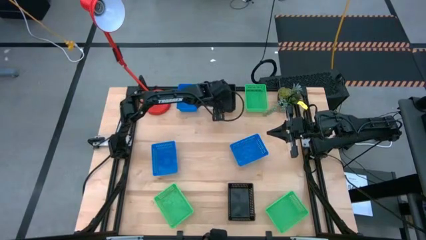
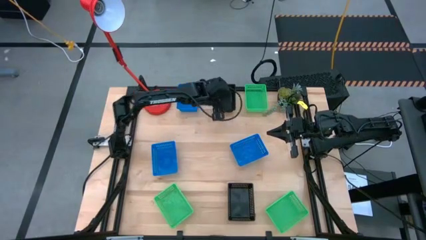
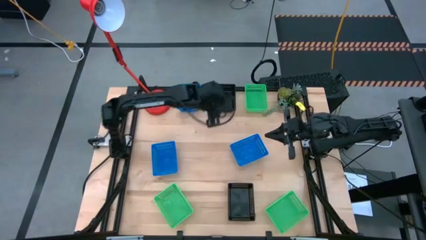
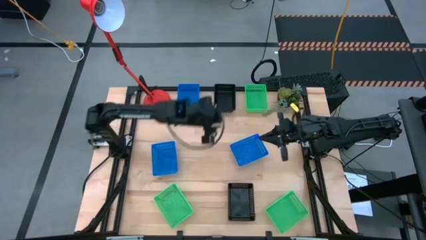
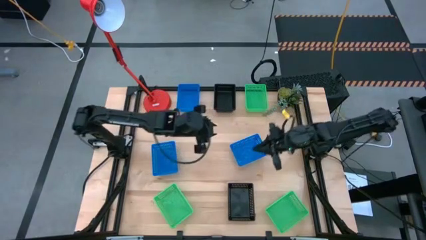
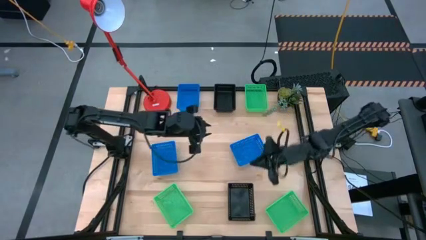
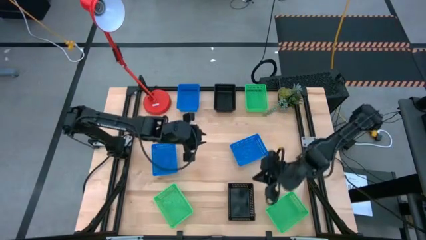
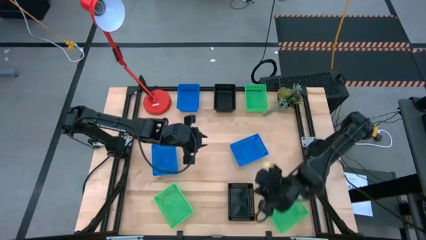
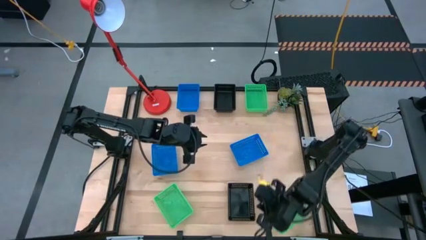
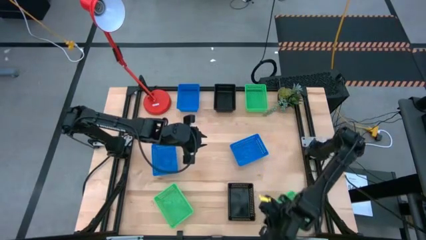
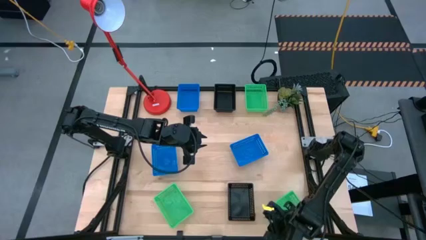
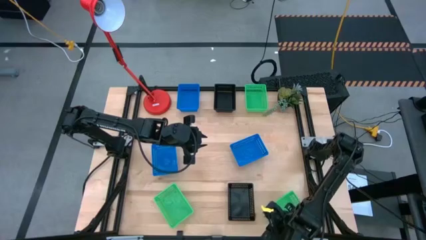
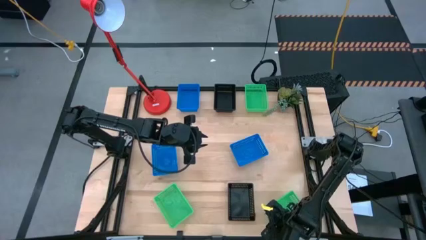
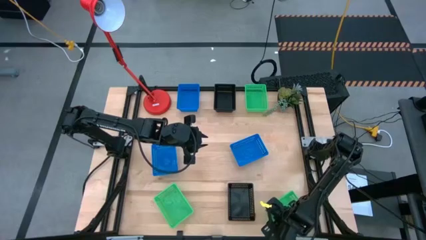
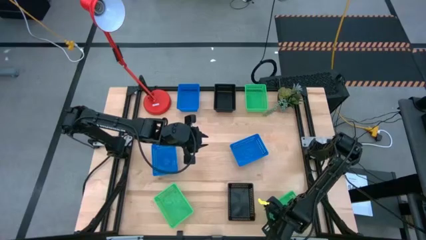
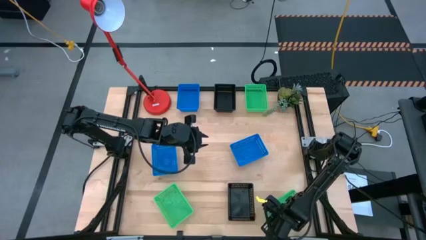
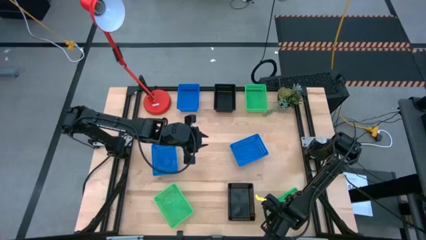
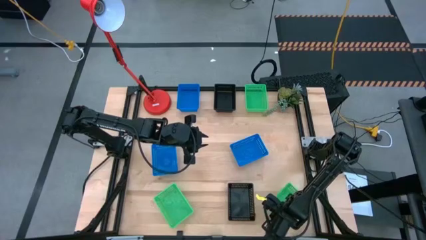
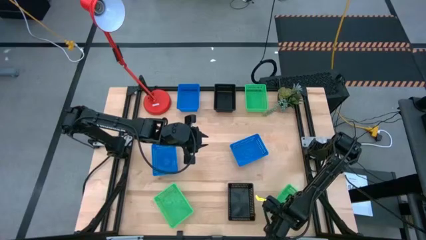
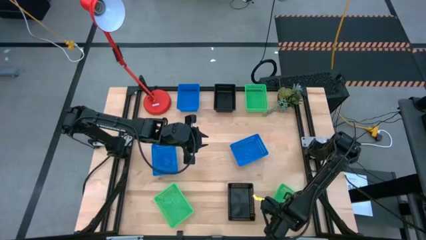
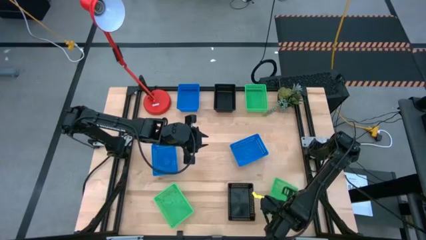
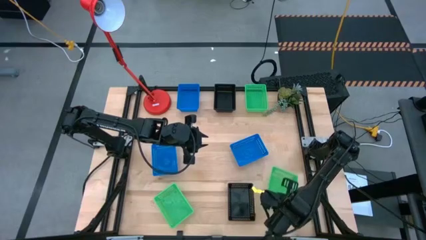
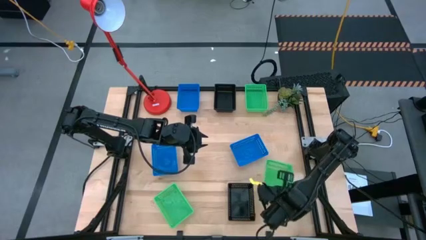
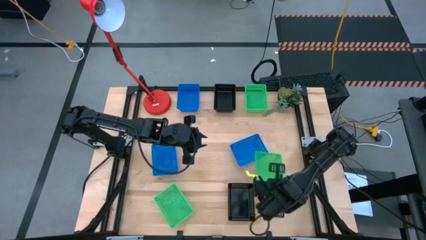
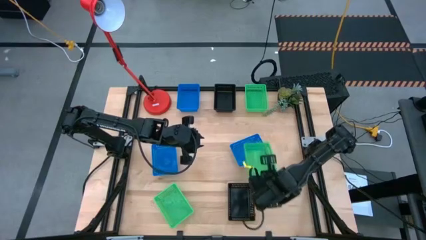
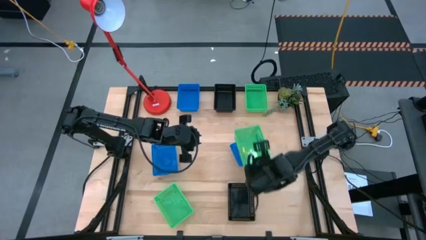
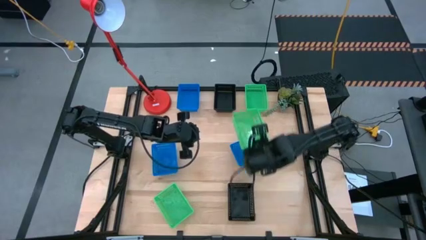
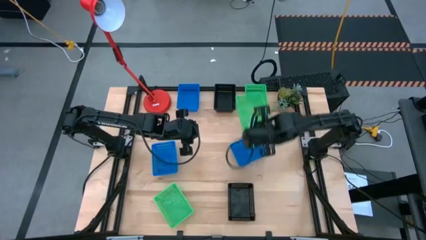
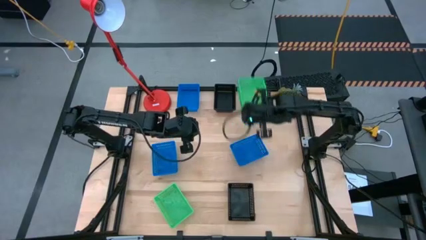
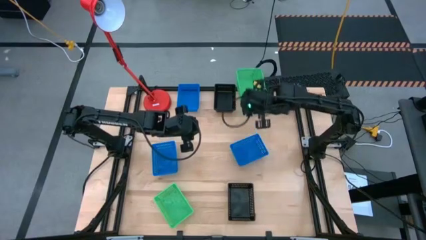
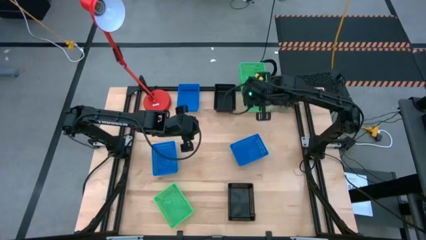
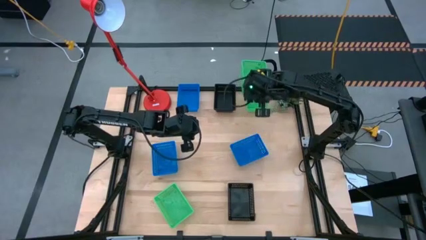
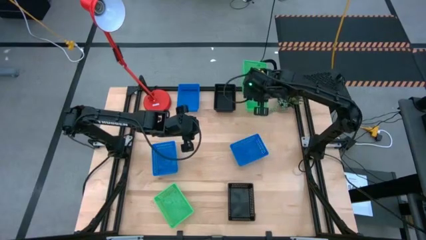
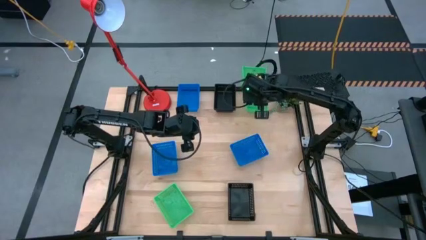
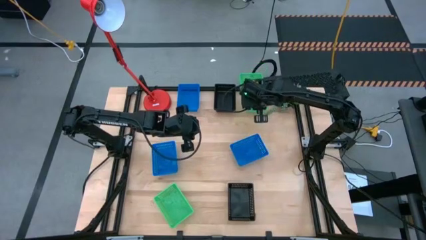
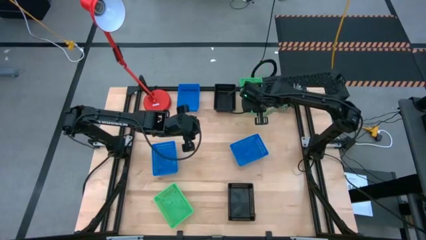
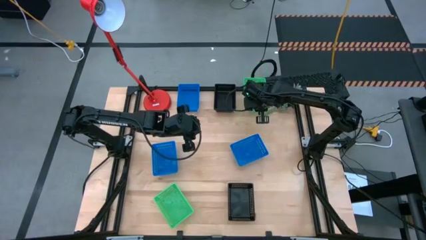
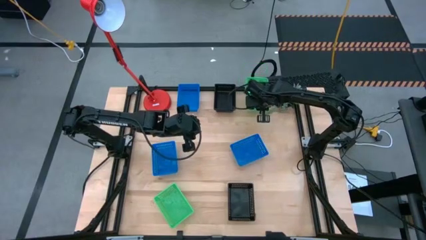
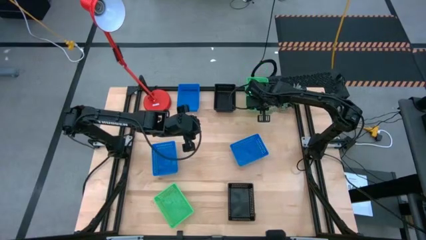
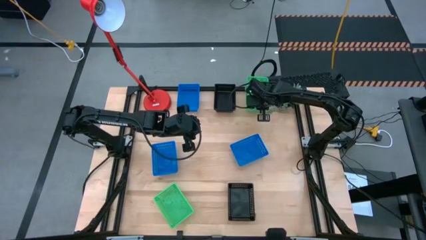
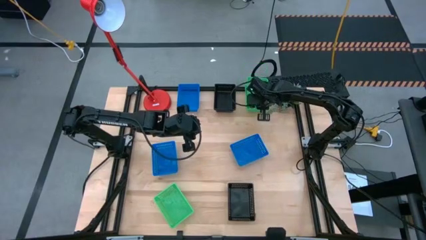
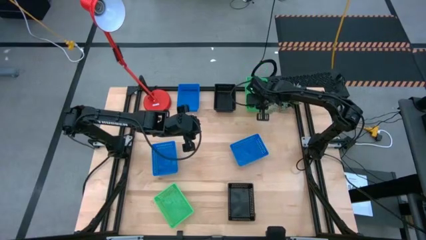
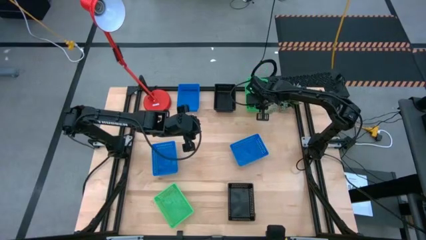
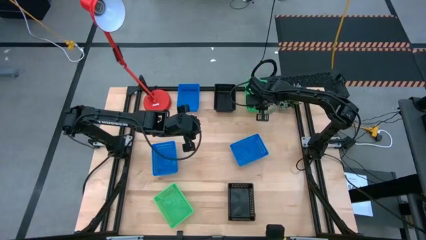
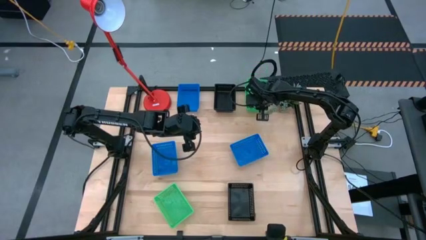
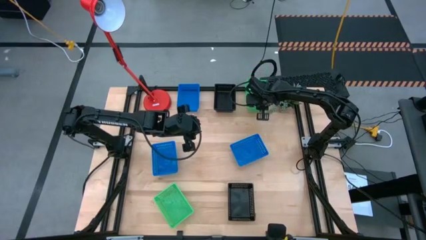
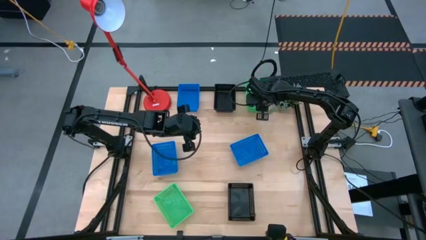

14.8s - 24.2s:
Stack the bottom right green basket on top of the top green basket

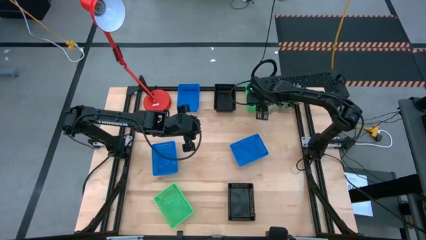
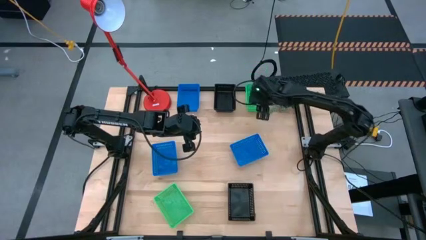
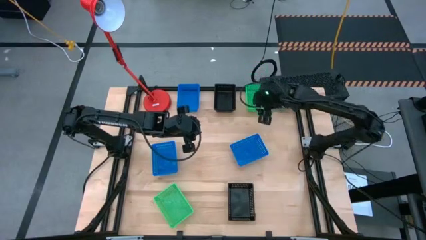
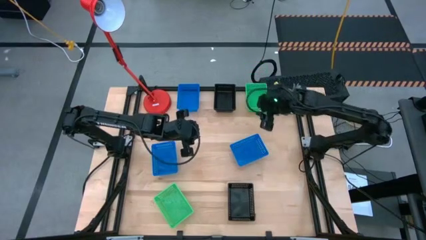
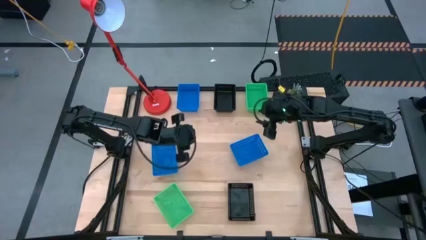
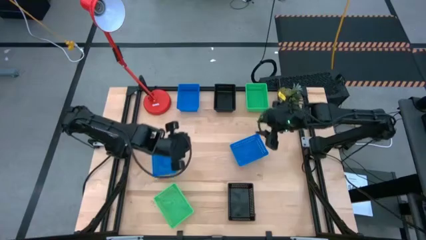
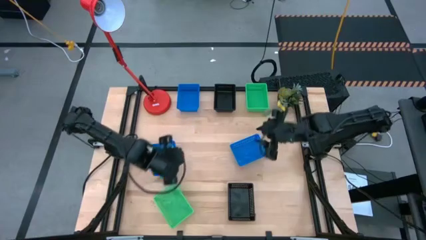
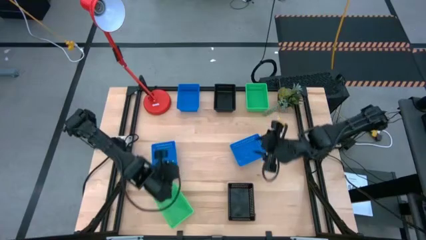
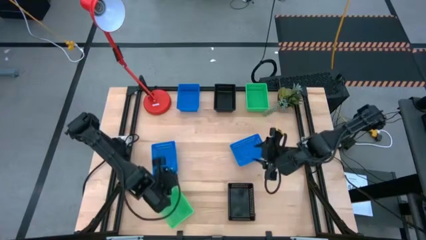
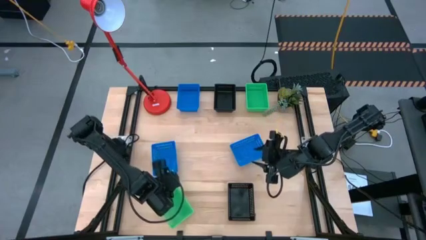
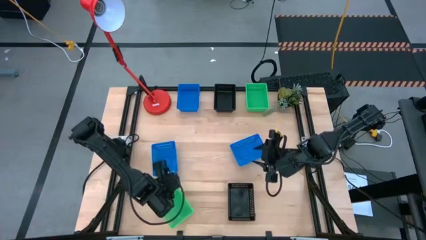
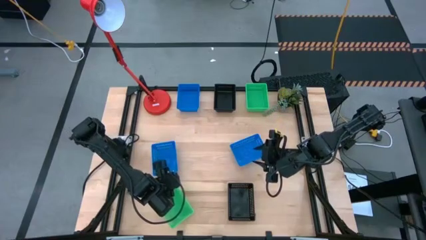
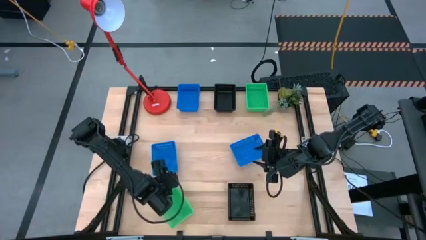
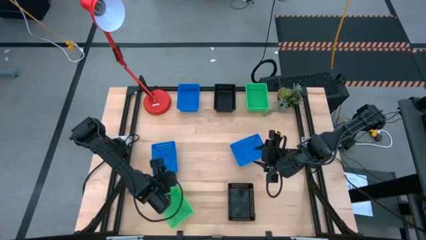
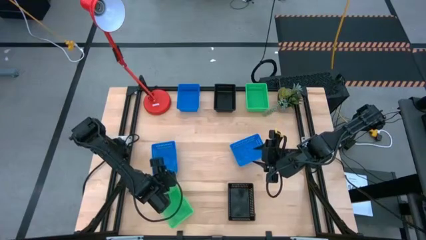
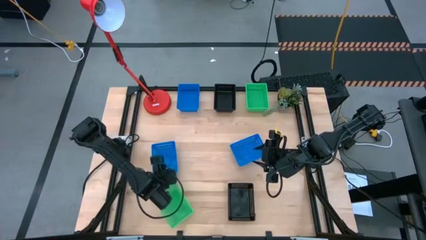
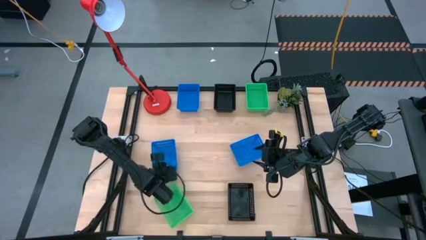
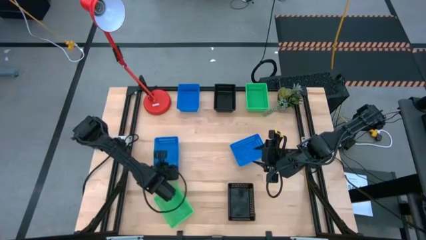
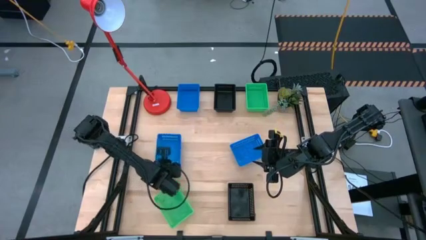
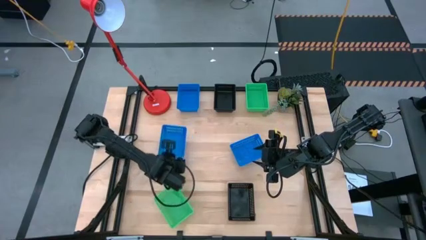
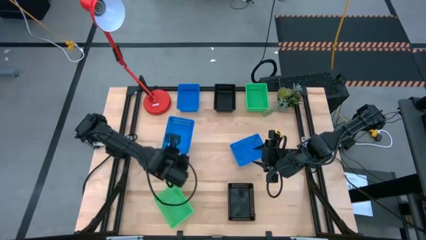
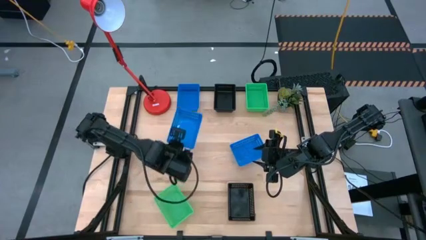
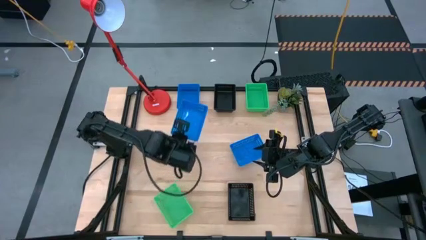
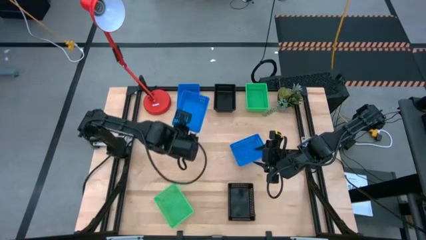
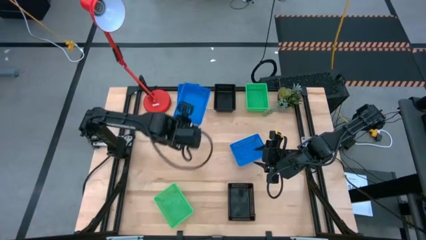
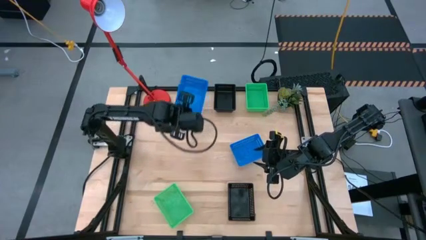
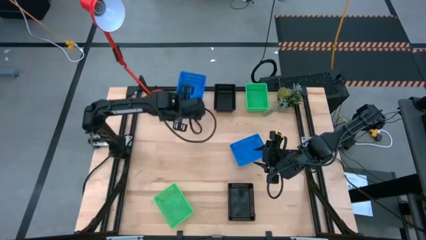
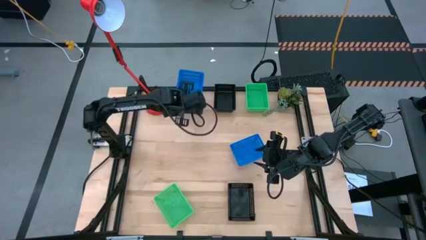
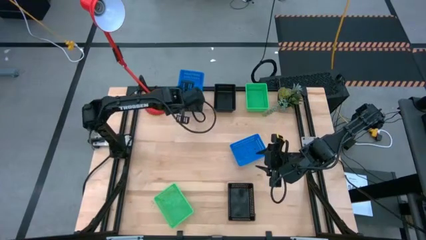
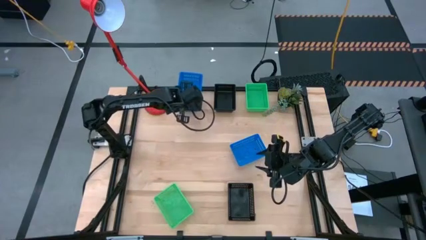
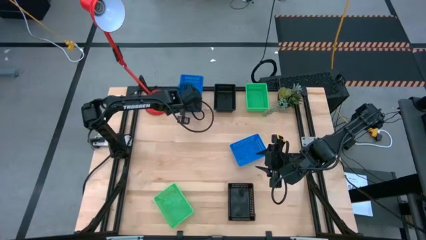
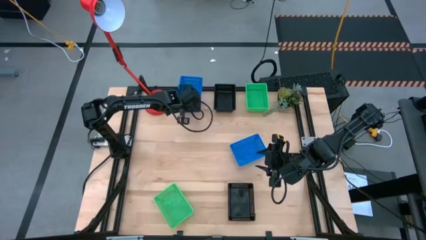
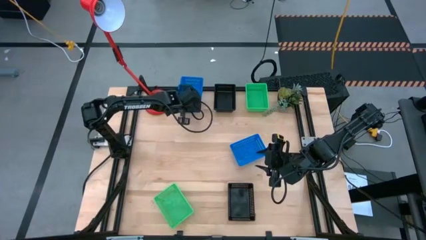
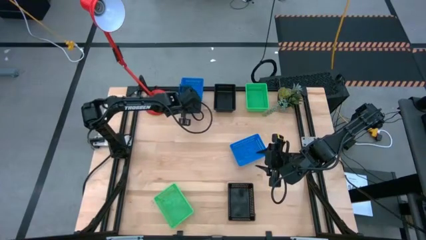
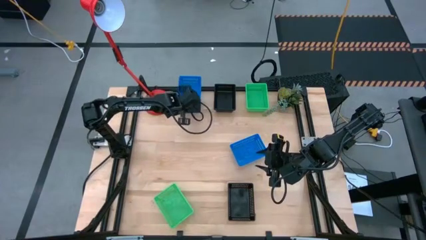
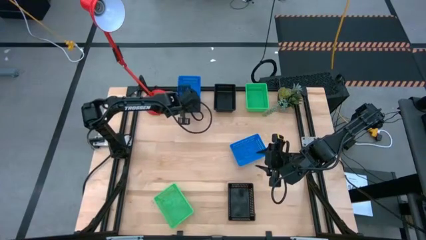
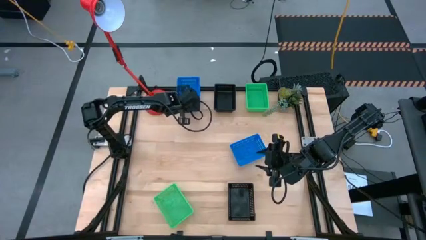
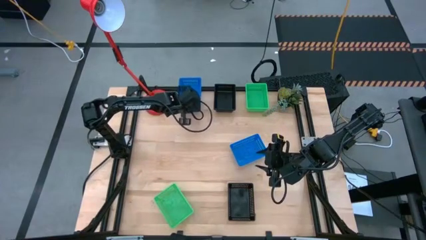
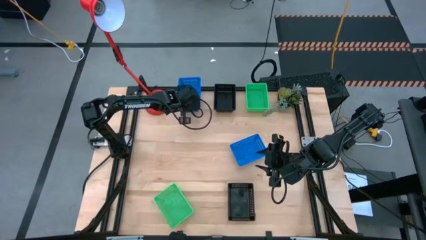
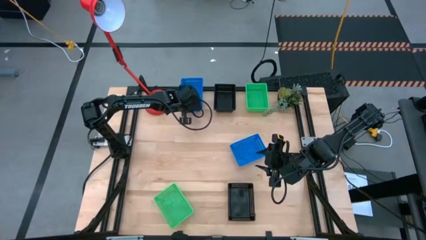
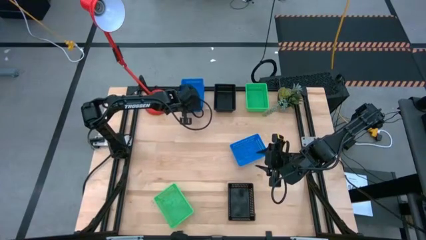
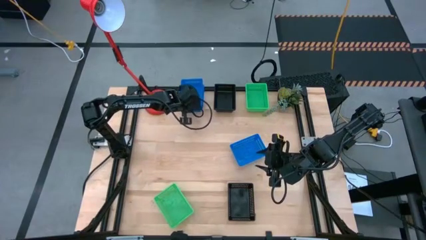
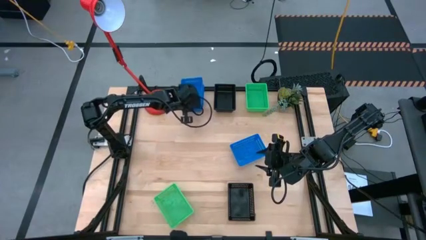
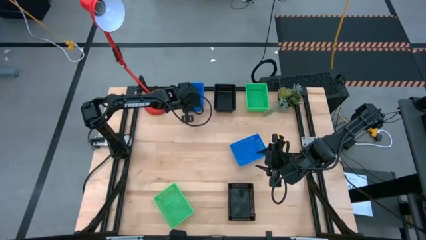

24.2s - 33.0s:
Stack the bottom left blue basket on top of the top blue basket
